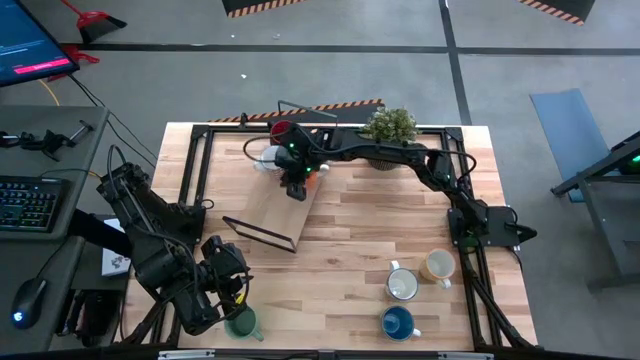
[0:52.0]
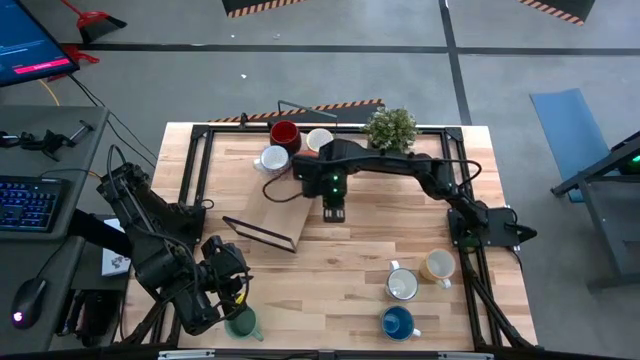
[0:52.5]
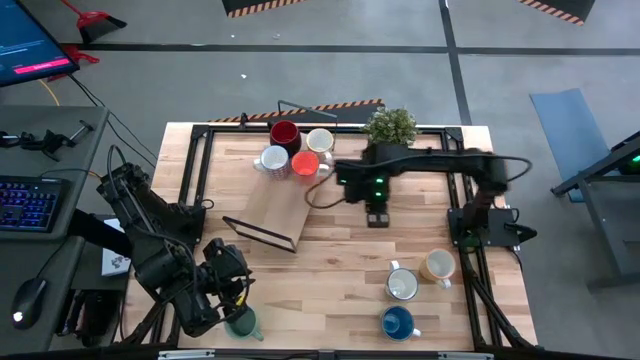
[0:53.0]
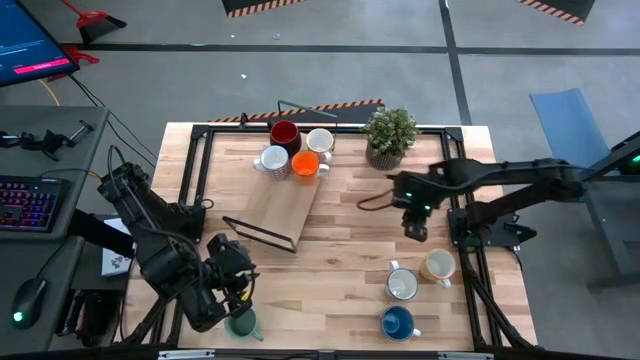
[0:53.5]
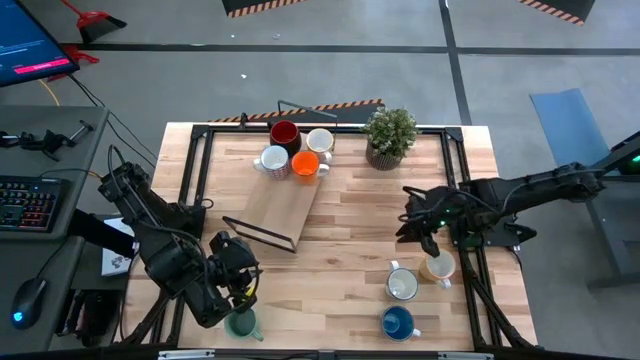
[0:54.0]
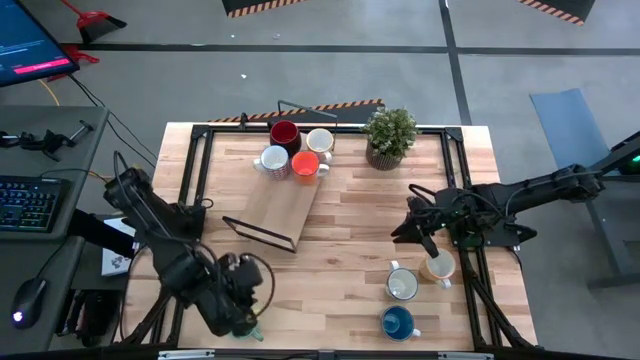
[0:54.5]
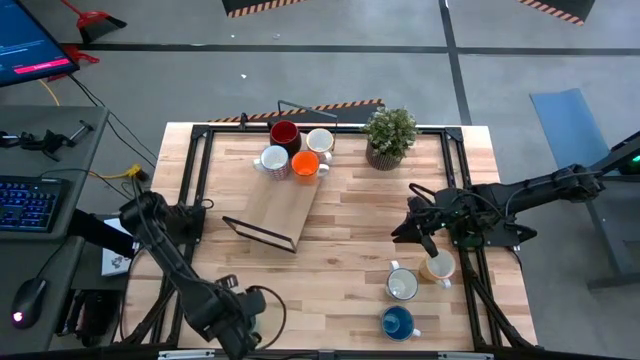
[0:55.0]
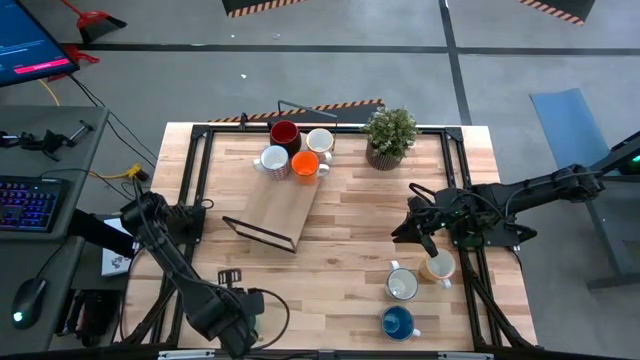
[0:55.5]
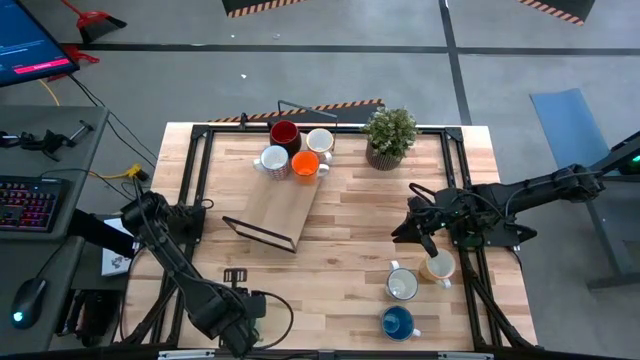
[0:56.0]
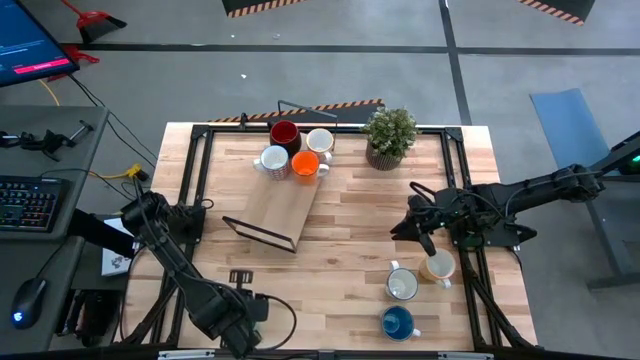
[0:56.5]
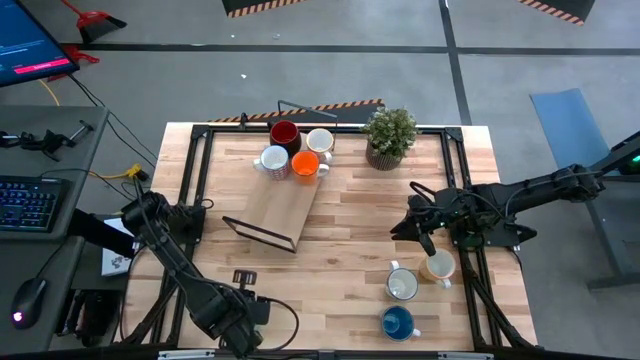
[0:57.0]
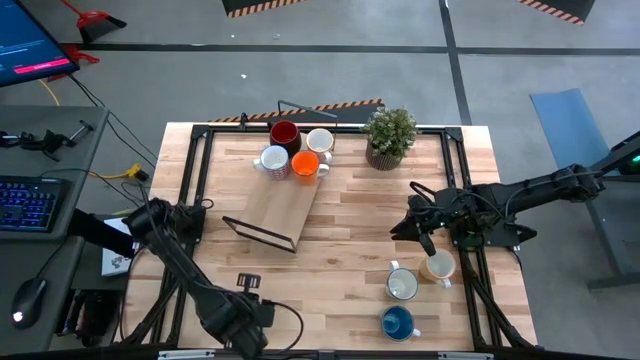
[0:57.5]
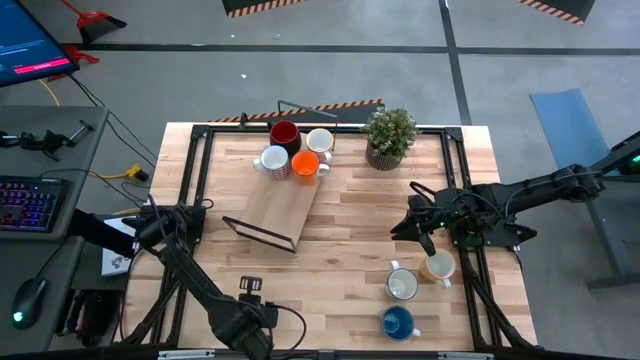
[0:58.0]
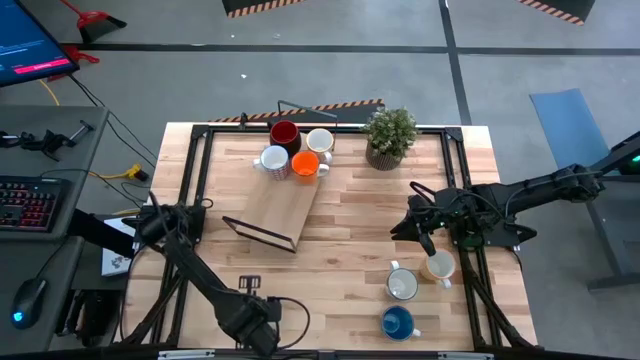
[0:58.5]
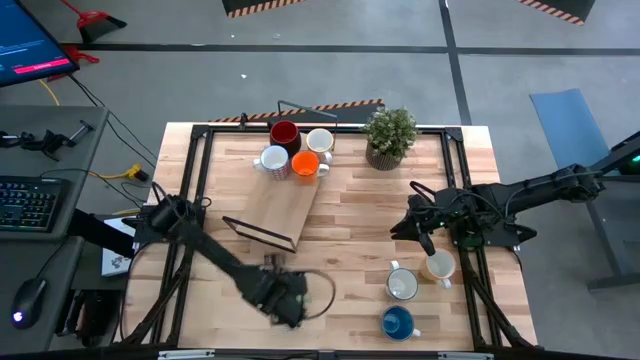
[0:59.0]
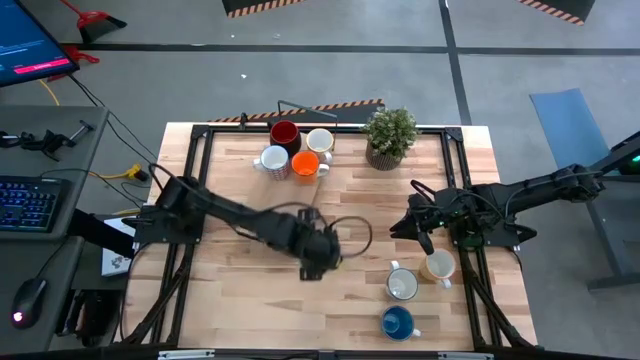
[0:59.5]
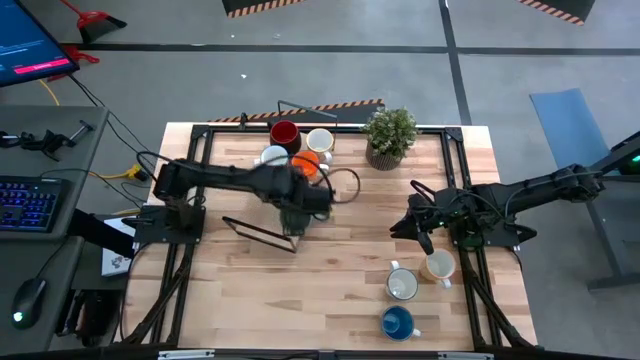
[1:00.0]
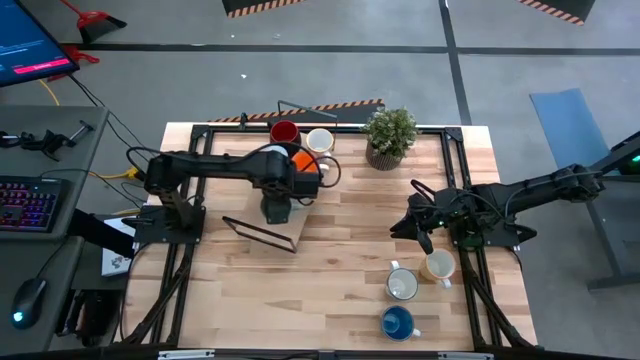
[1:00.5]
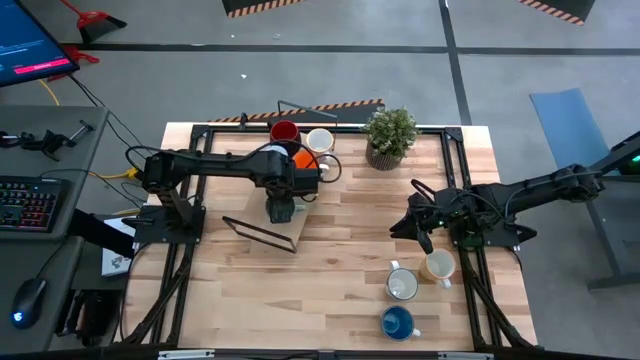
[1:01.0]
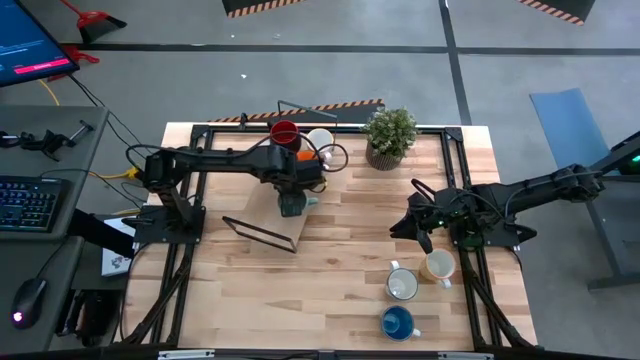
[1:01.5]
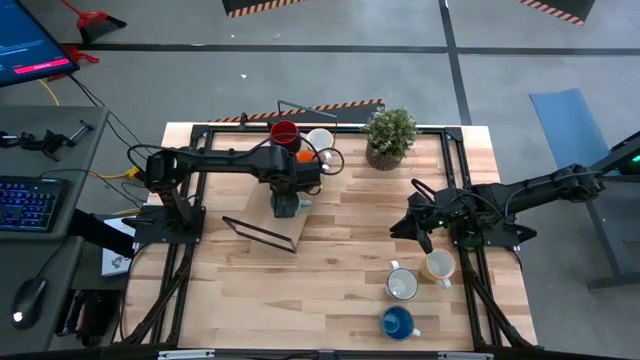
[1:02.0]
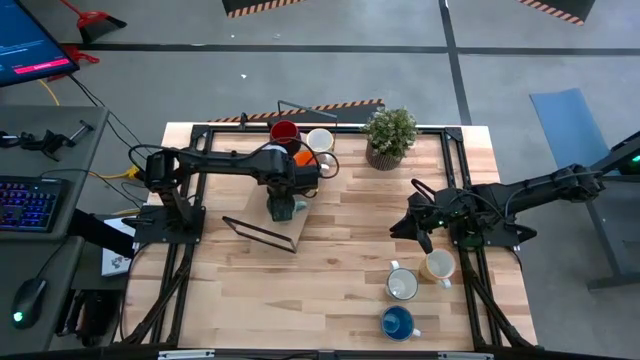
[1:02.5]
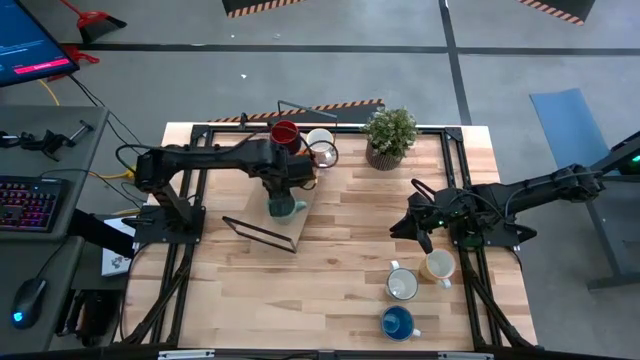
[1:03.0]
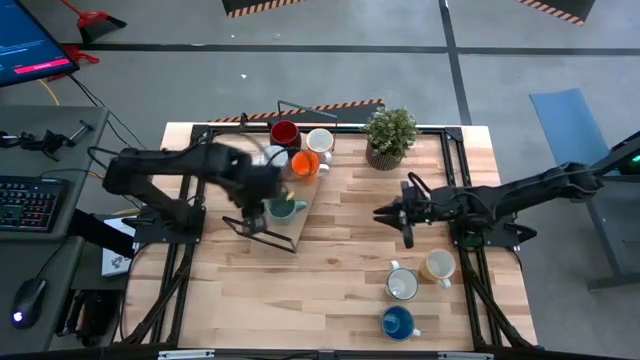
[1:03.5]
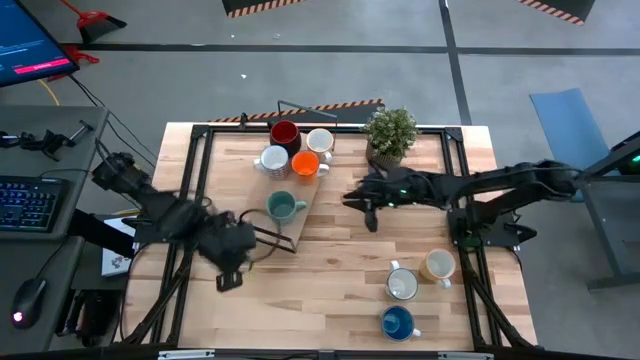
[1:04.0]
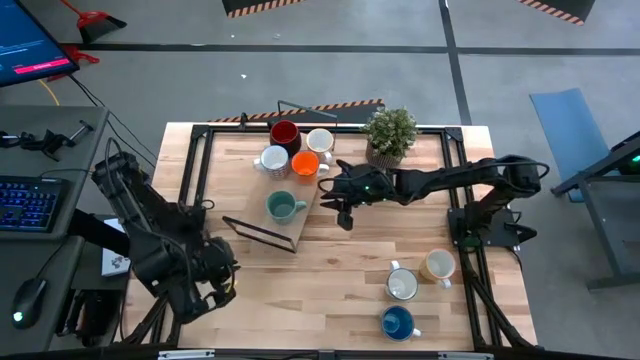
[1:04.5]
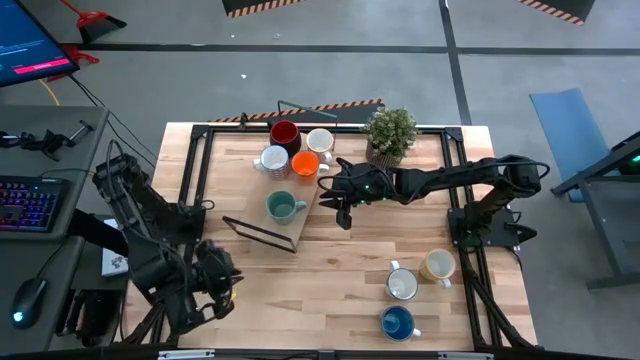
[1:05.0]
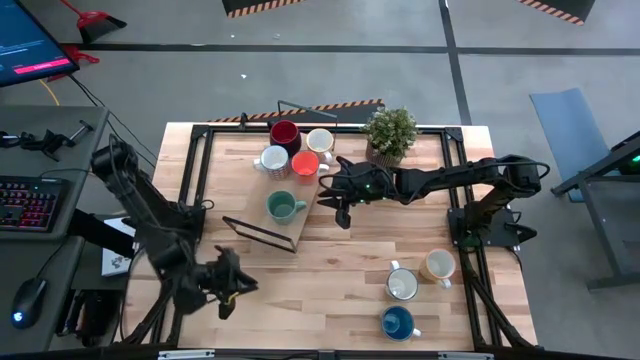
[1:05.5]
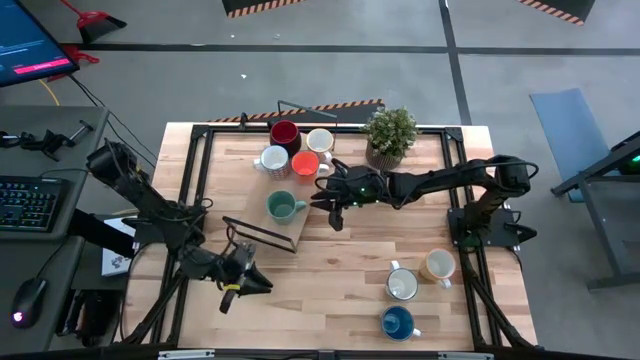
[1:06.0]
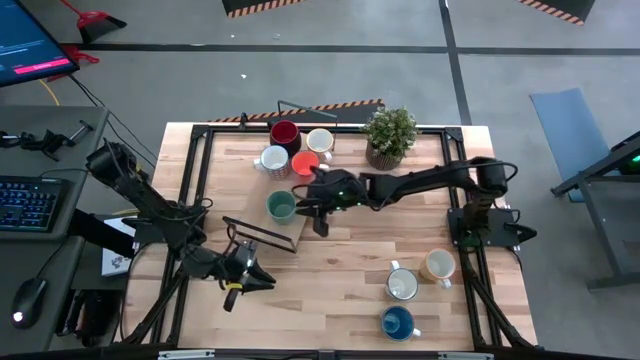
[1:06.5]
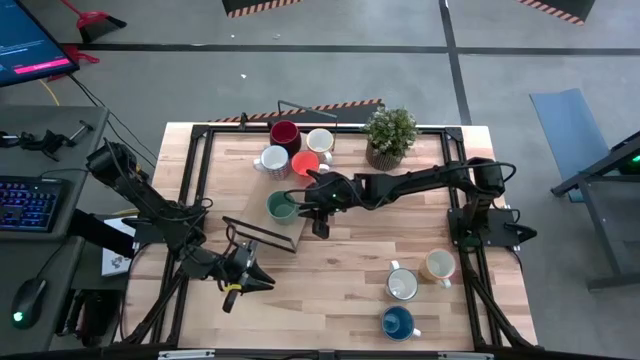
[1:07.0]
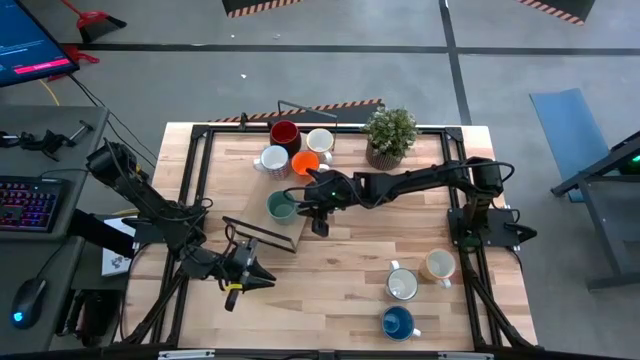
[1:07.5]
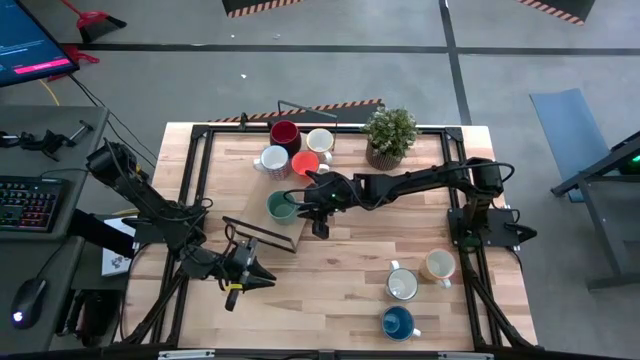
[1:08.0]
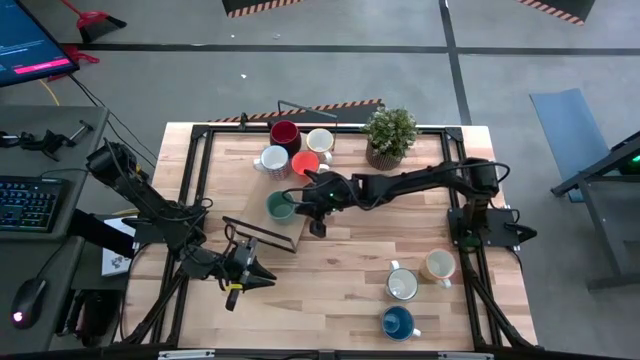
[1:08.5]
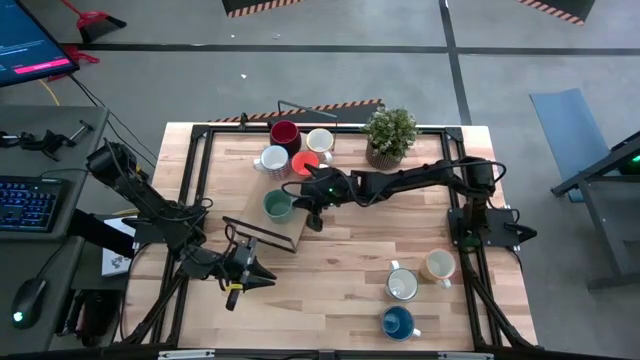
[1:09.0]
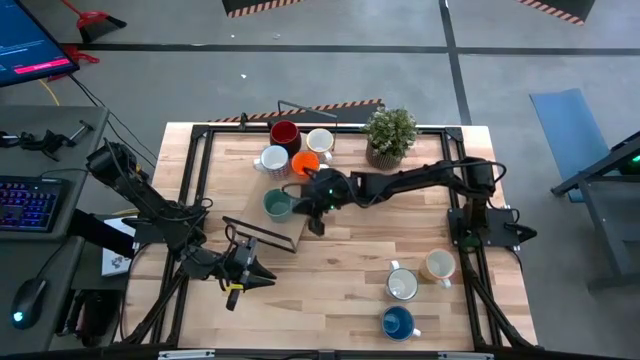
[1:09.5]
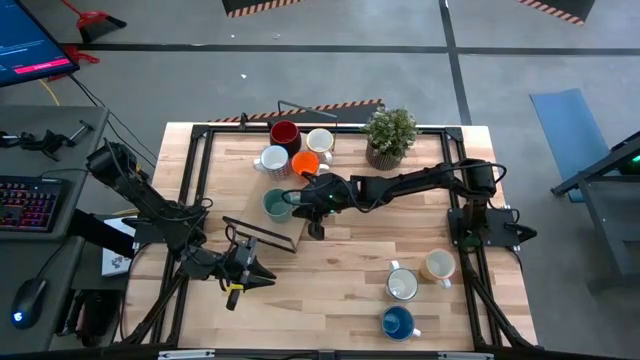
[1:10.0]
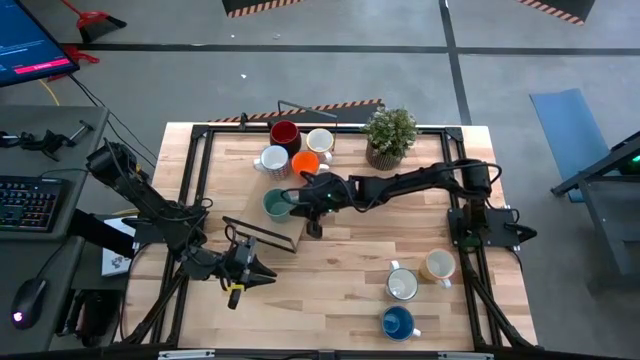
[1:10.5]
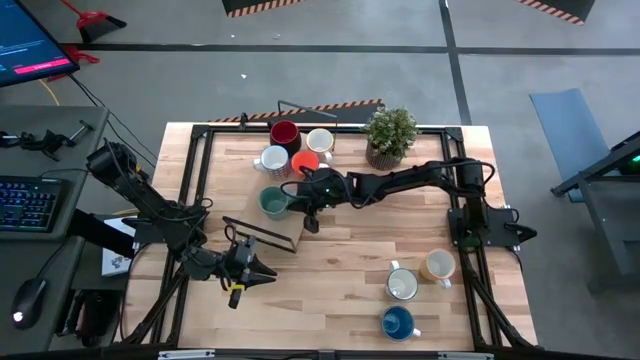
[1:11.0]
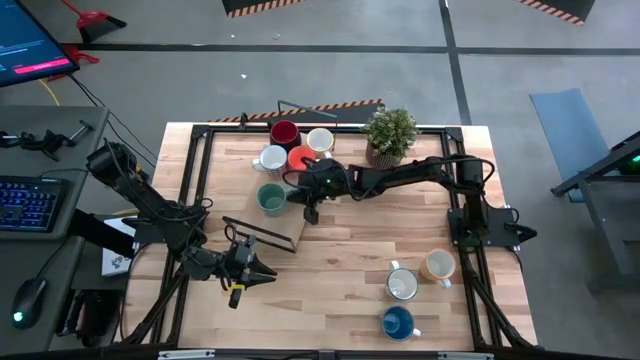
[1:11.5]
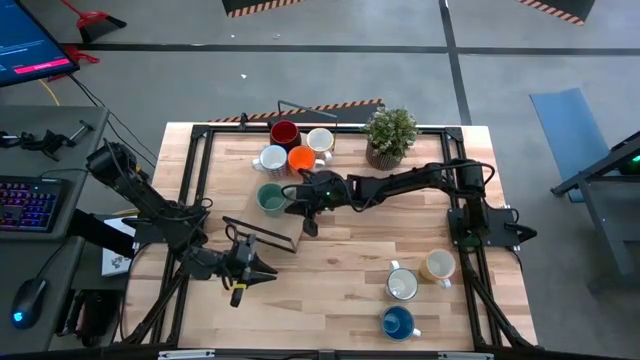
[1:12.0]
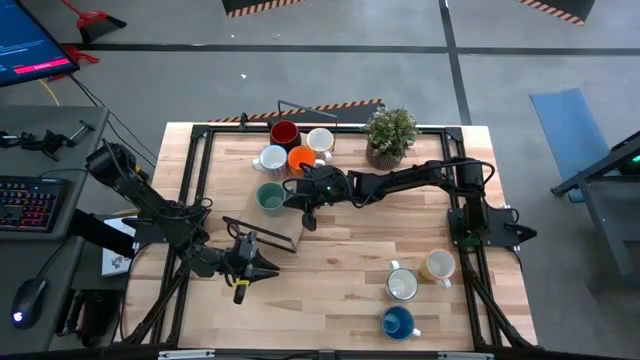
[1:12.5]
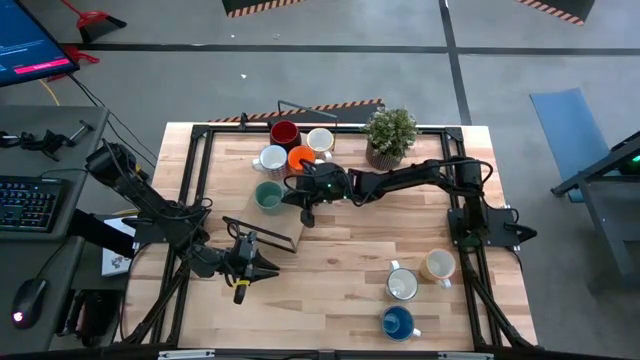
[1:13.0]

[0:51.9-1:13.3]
Task: Place coffee mugs
Put the light blue cup on the shelf
